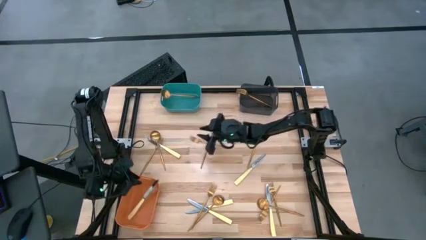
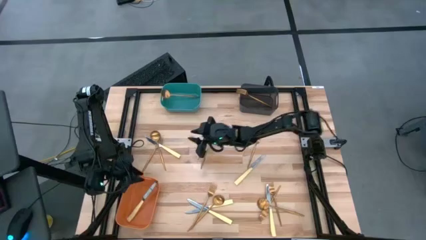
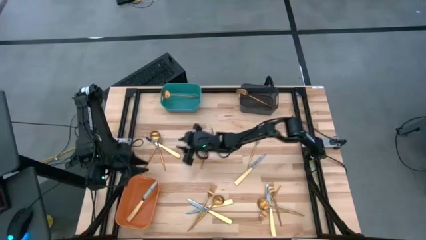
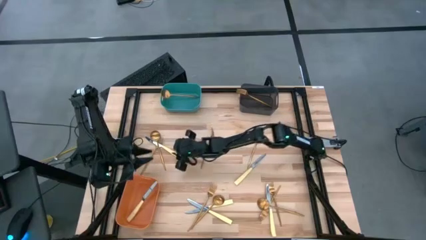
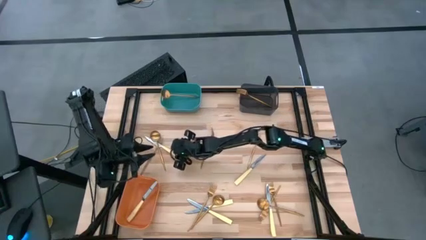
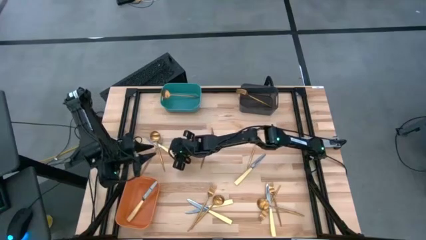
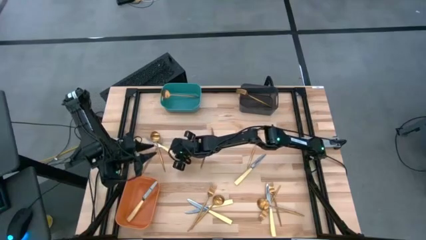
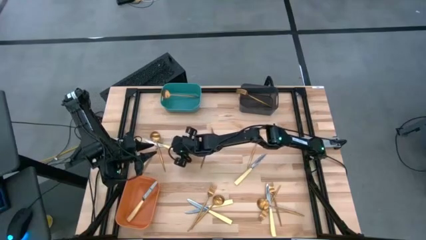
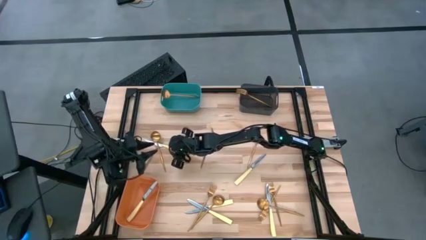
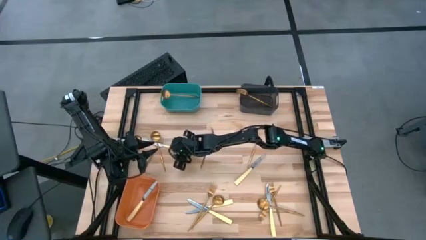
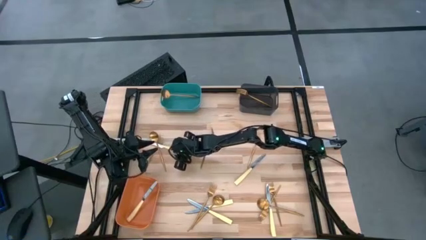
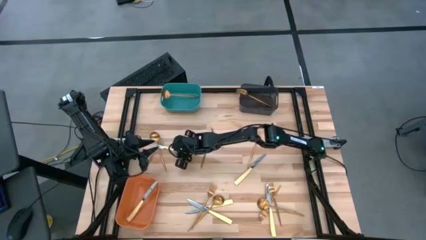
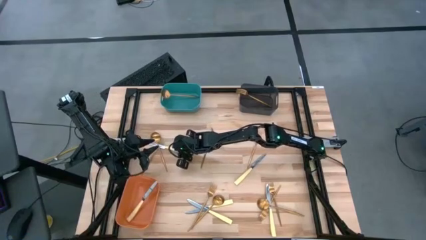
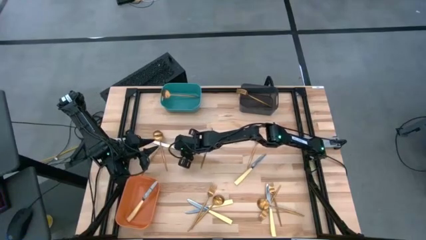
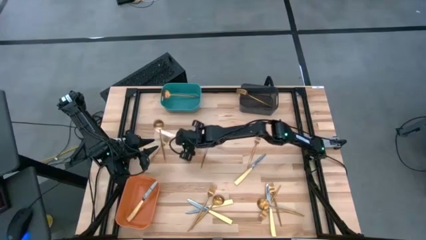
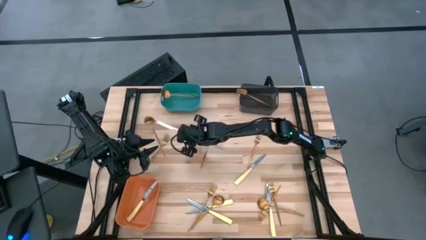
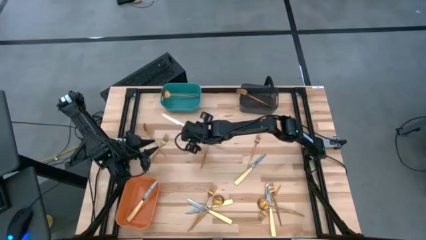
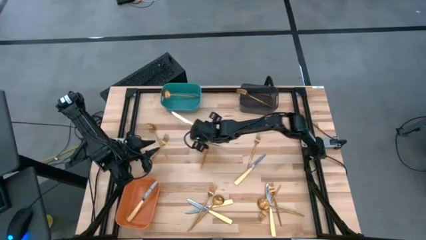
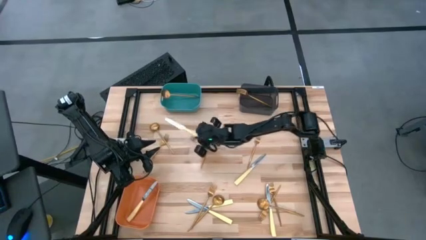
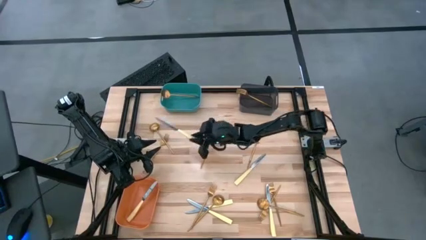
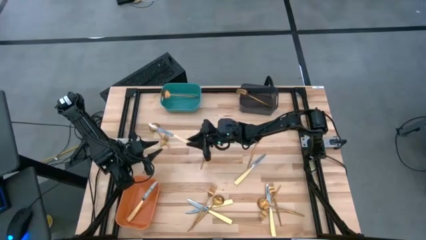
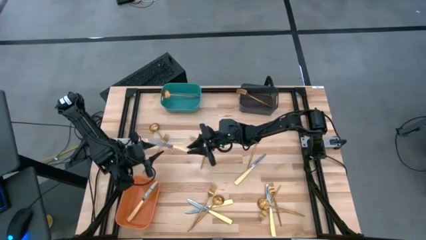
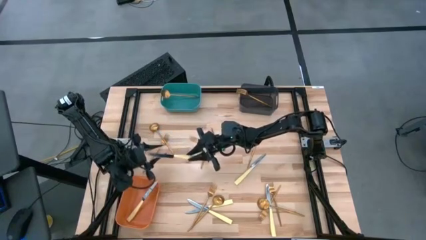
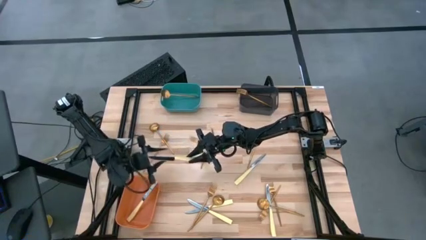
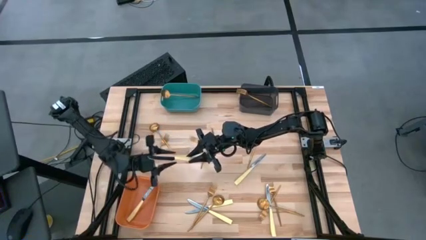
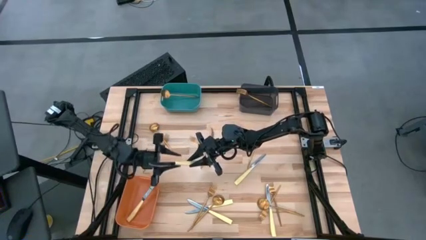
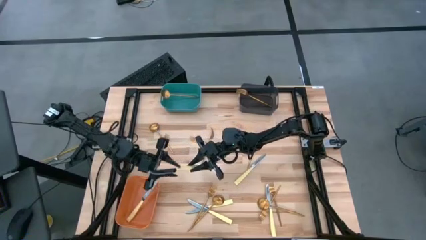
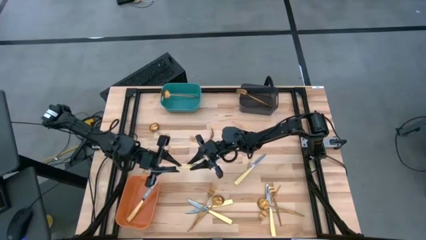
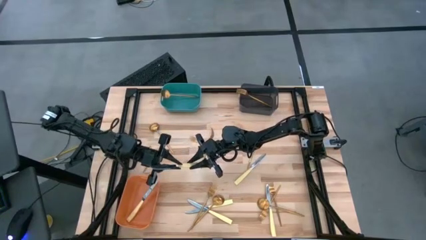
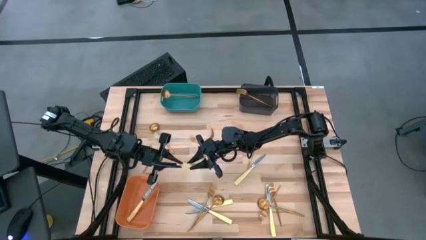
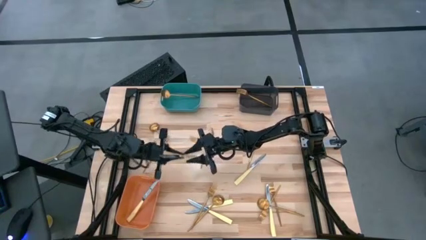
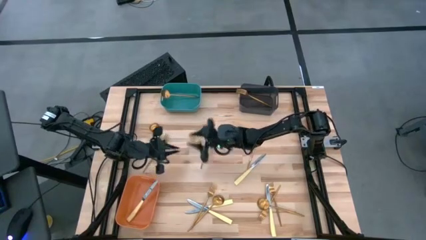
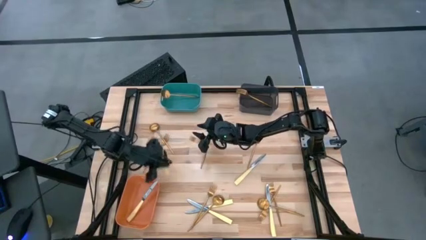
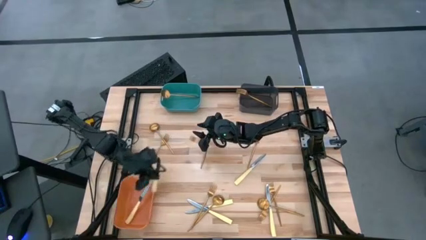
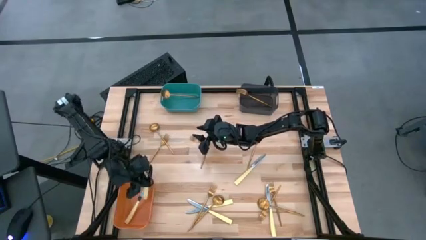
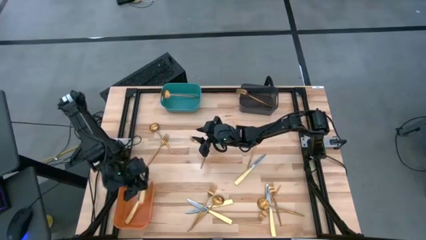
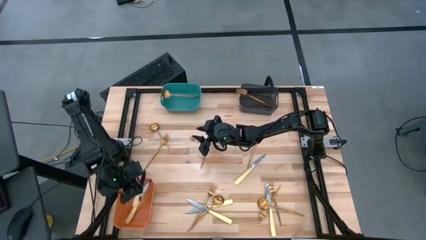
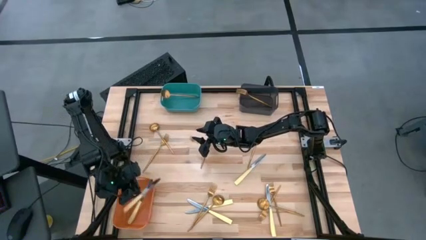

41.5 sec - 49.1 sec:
Task: Sort silverware by color (type)
Put the yellow table knife into the orange bin

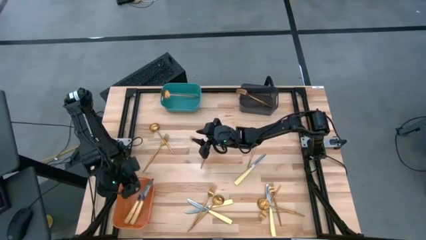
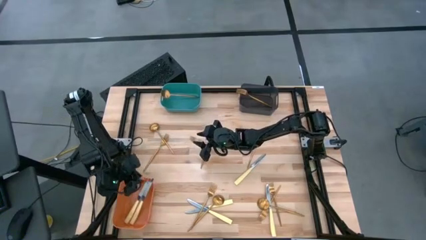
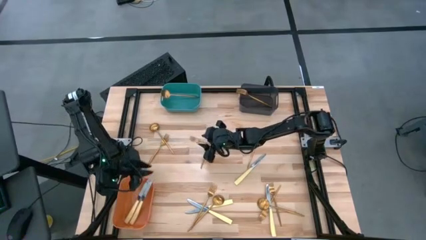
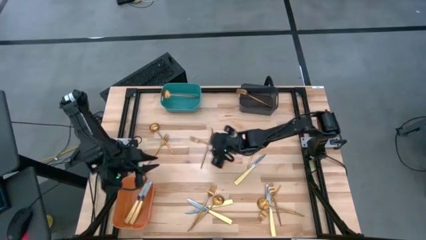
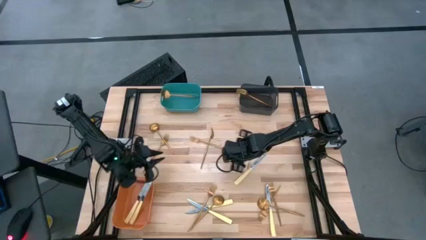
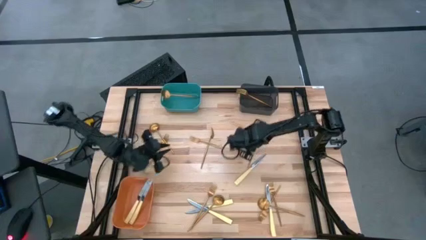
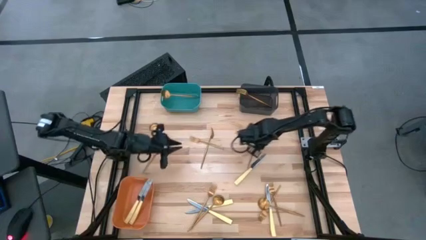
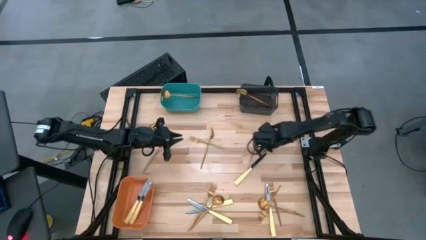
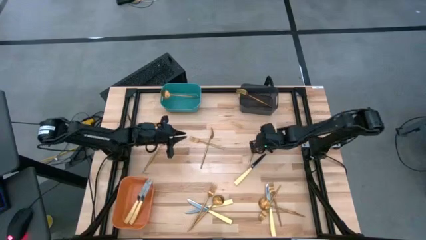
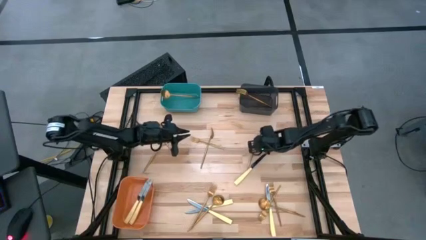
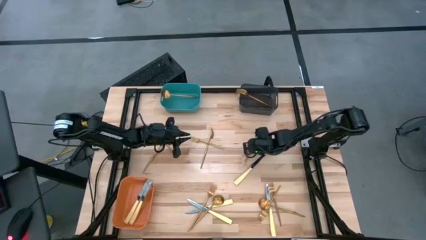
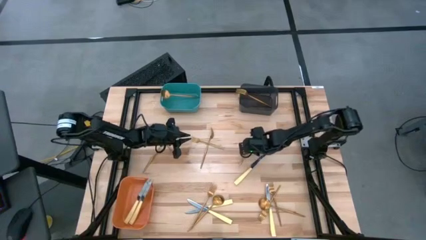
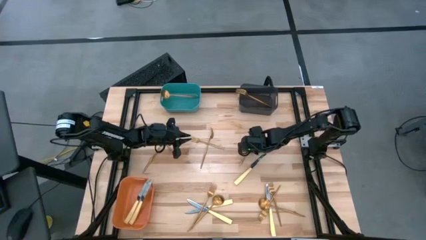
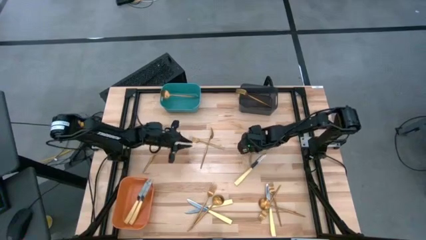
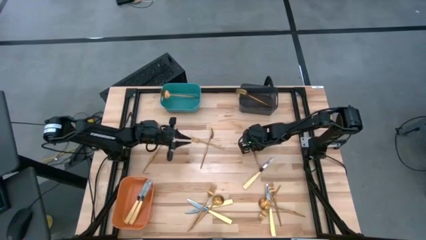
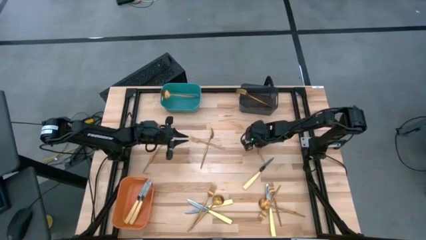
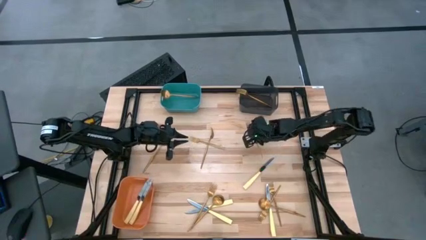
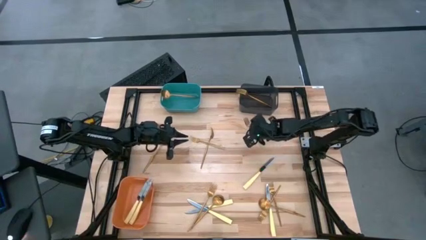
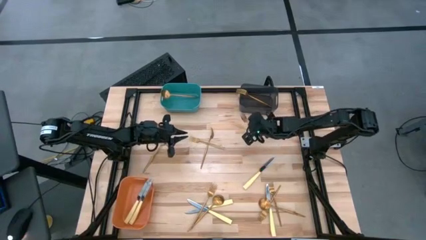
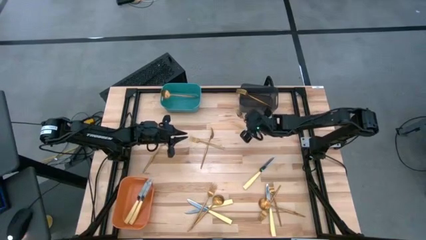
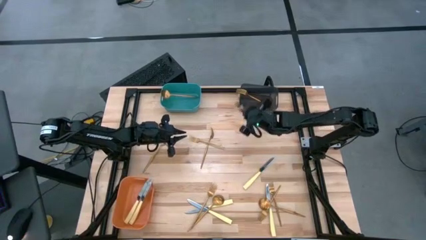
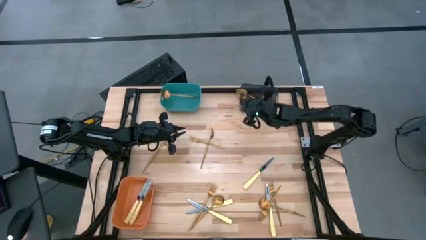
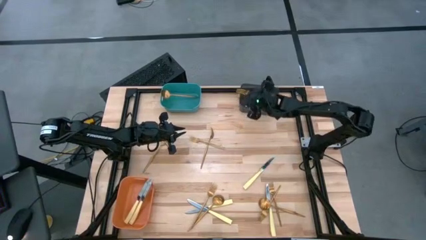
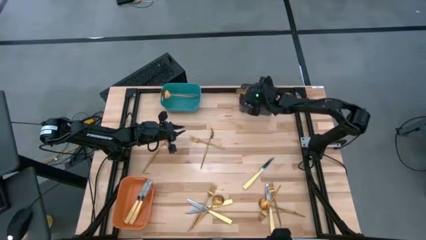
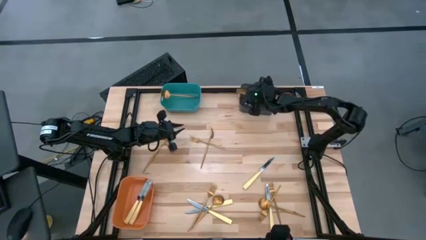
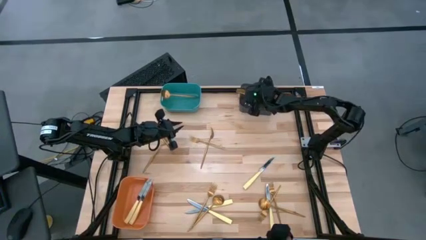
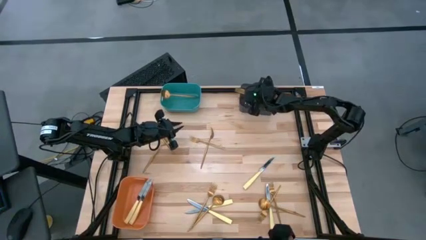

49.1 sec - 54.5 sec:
Put the gold fork into the black bin
